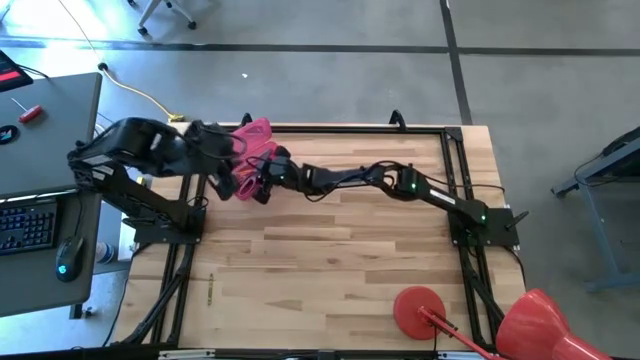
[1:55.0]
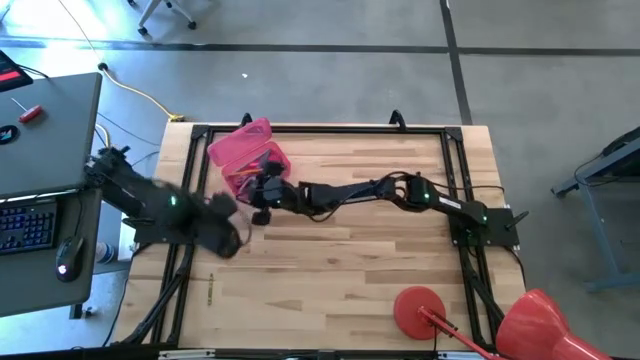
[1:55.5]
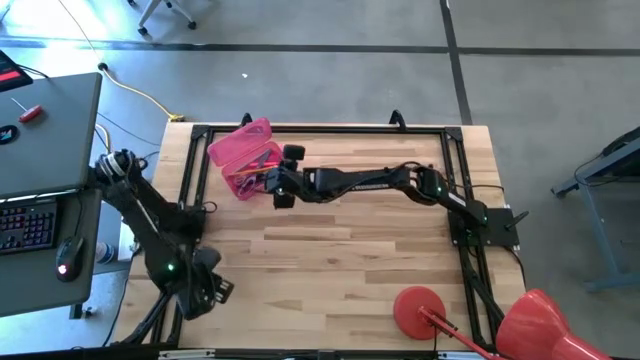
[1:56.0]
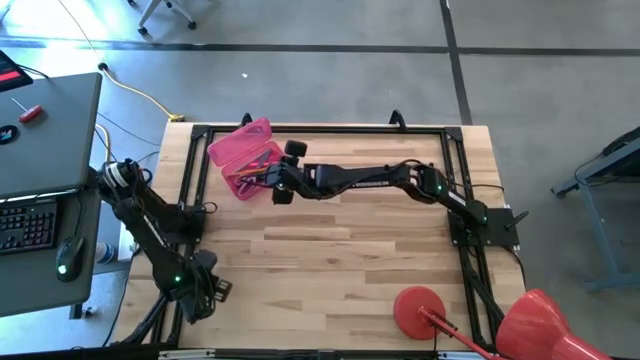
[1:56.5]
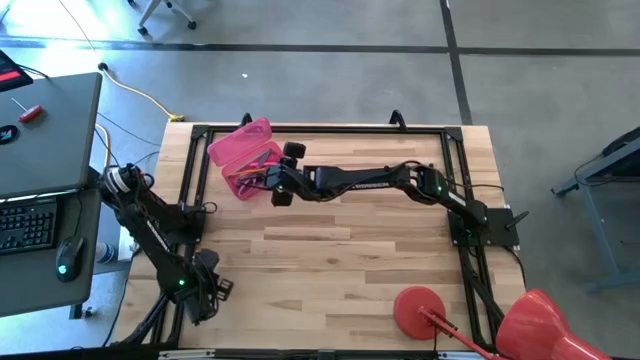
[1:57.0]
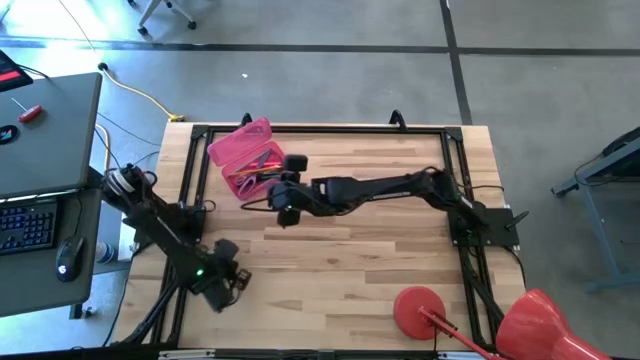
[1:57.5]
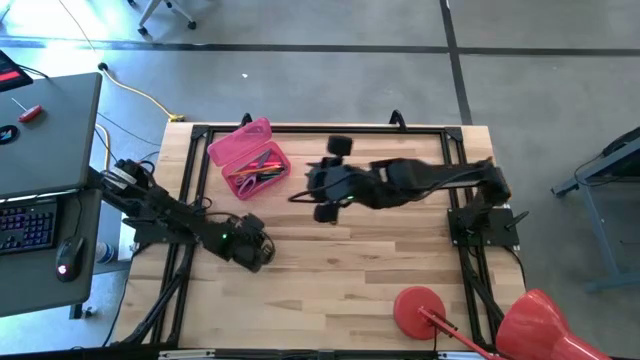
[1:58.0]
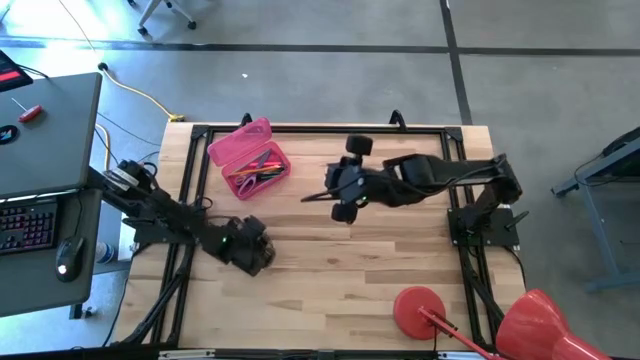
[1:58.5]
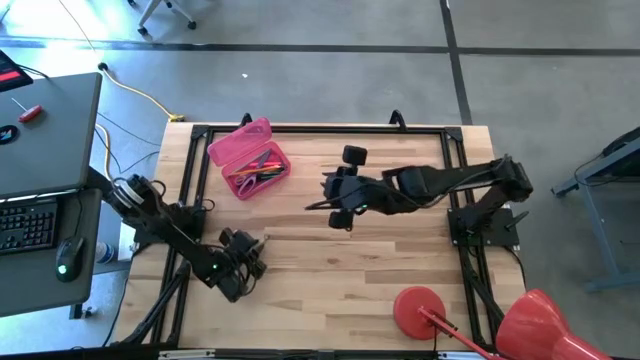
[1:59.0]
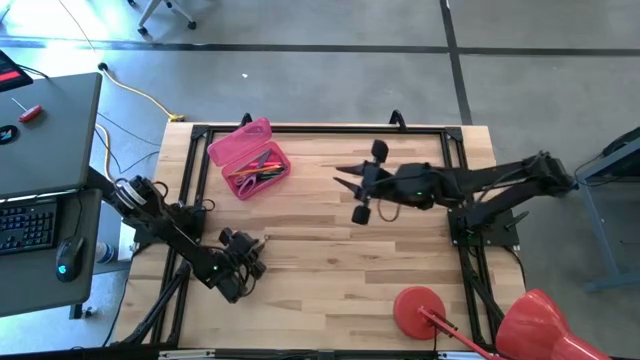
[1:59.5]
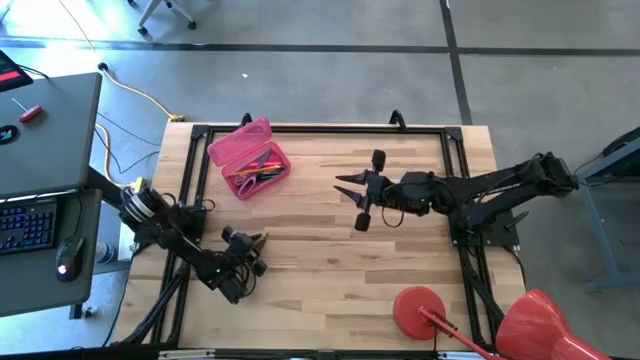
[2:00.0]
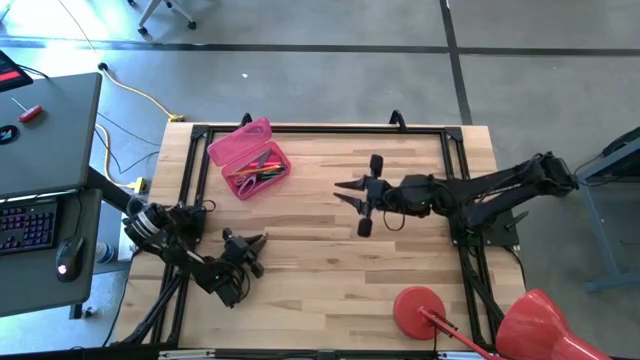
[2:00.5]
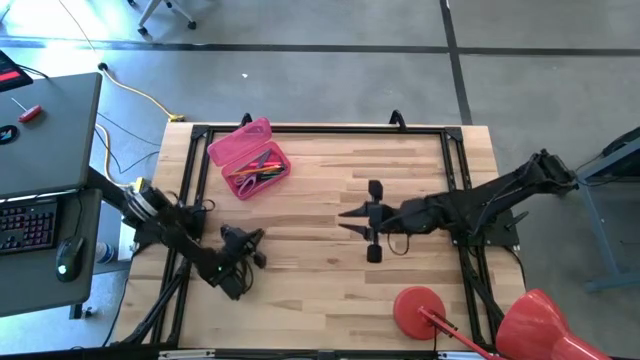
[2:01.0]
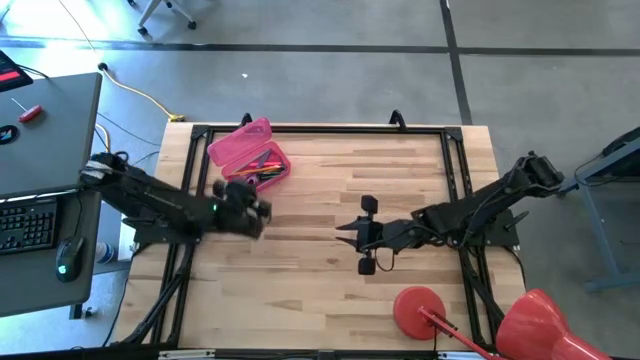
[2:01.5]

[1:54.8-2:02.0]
Task: Pick & place school supplies into a supply box
Put the light green crayon into the supply box

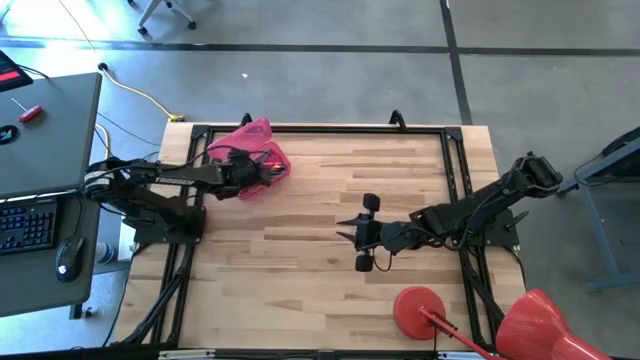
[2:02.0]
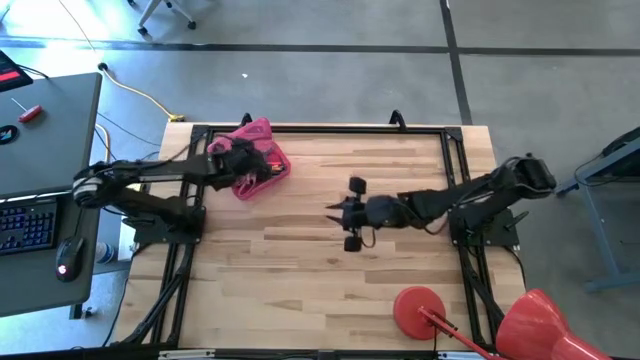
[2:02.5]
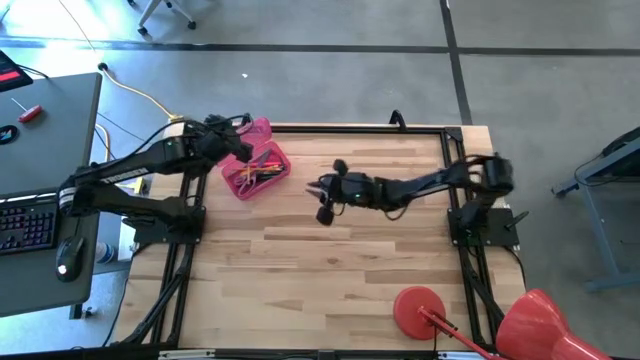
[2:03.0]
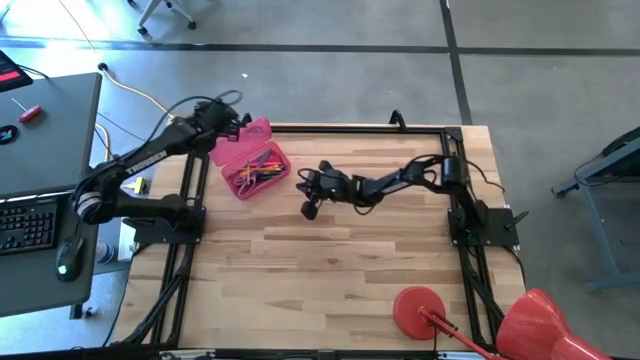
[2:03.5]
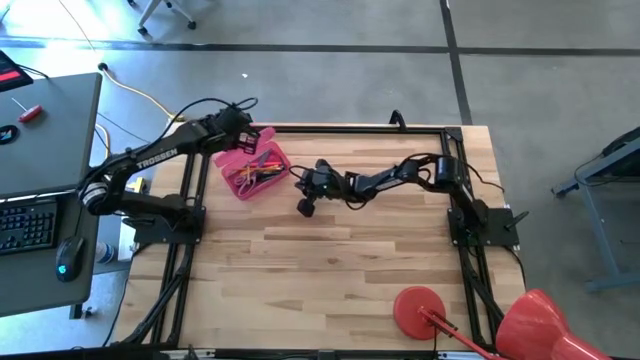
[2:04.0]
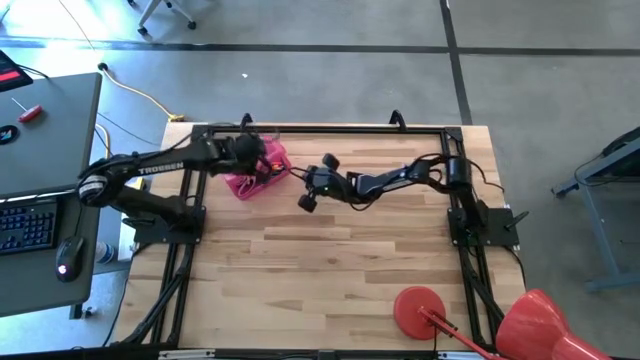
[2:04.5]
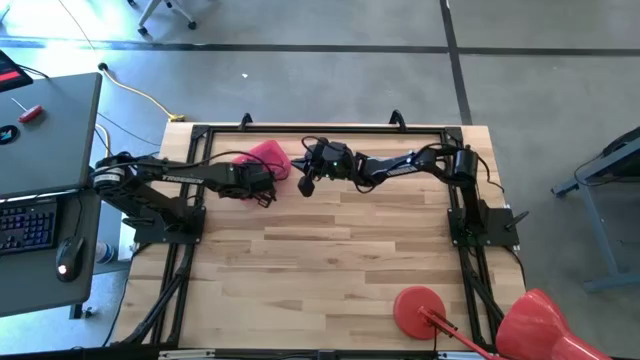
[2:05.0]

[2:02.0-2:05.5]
Close the supply box

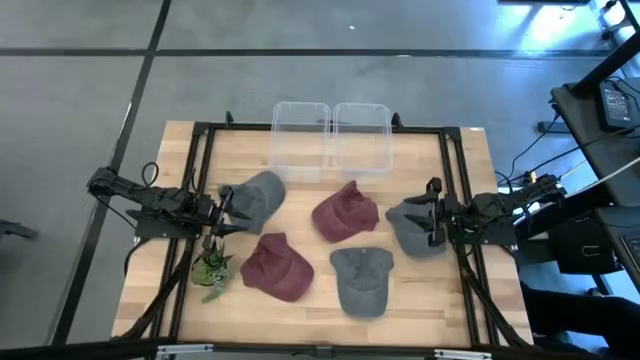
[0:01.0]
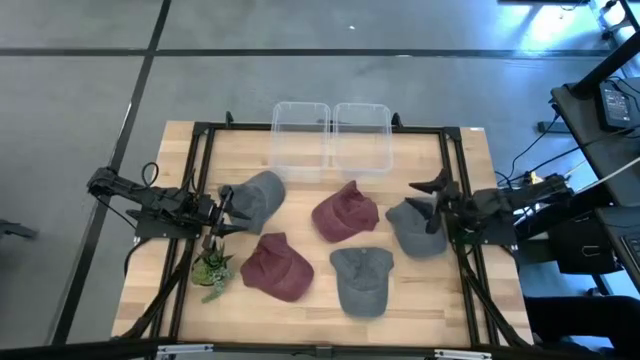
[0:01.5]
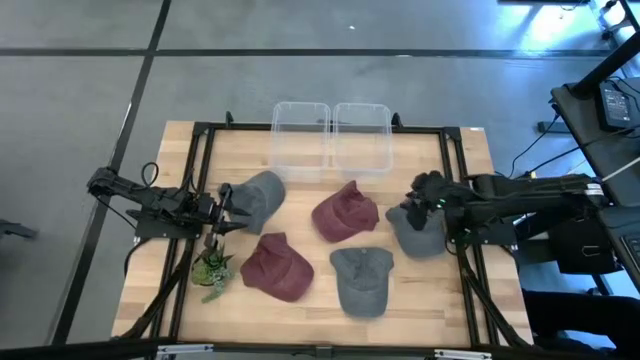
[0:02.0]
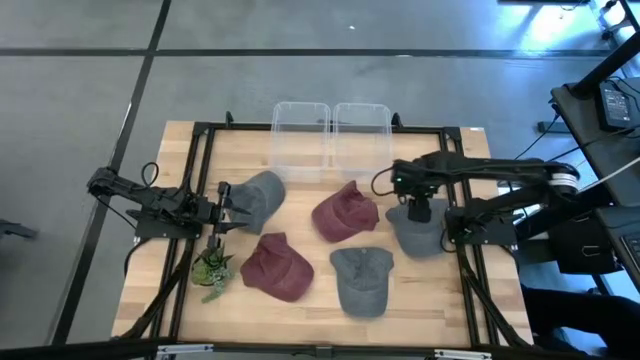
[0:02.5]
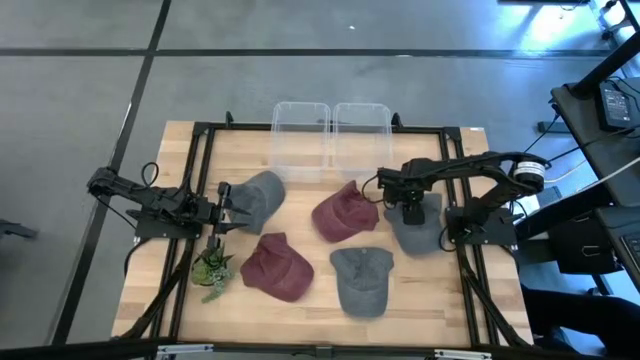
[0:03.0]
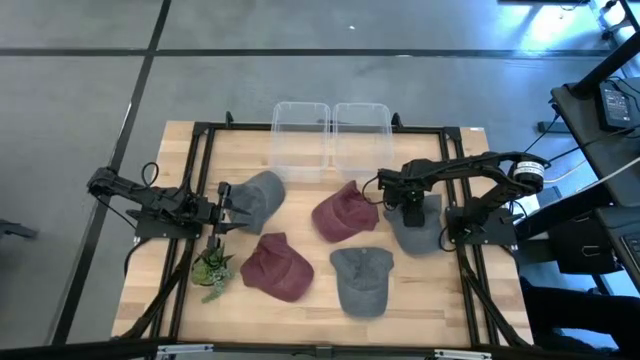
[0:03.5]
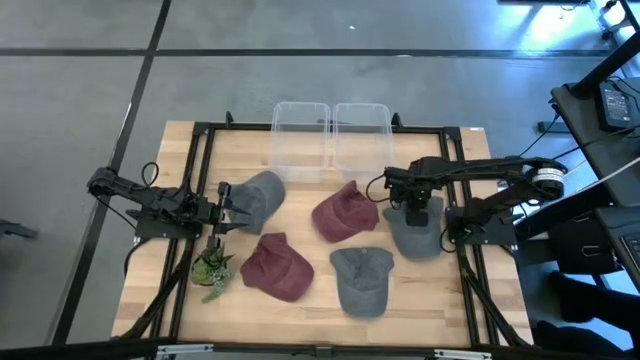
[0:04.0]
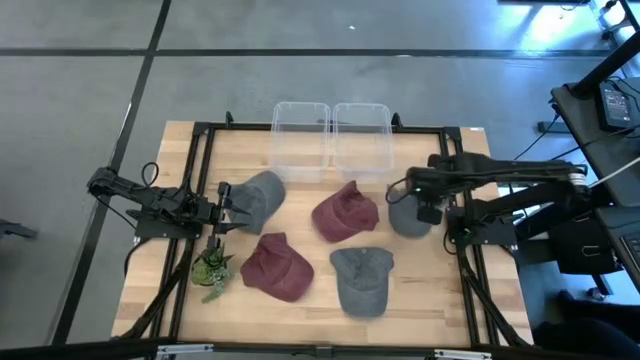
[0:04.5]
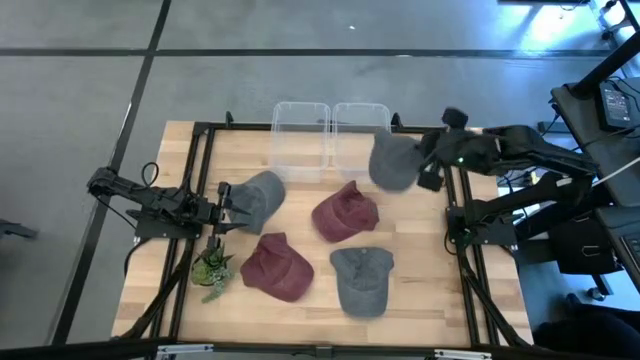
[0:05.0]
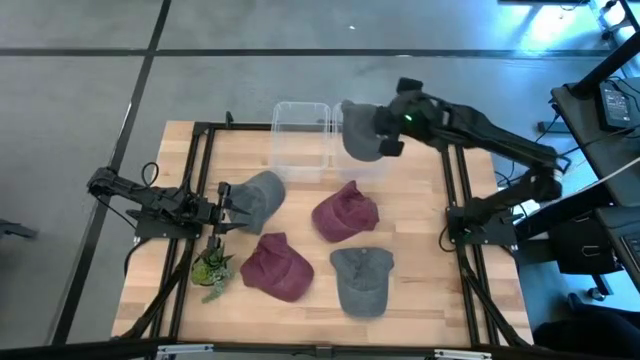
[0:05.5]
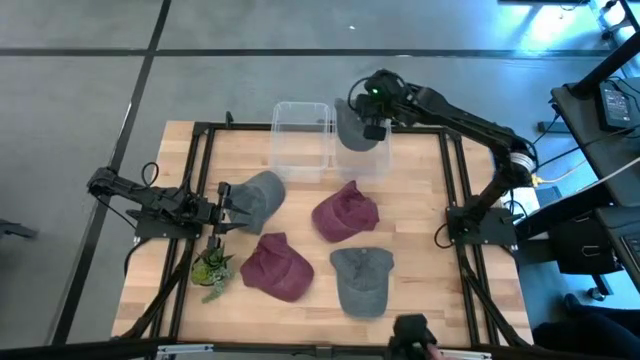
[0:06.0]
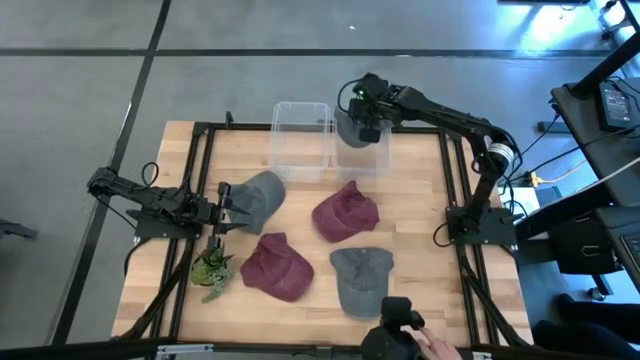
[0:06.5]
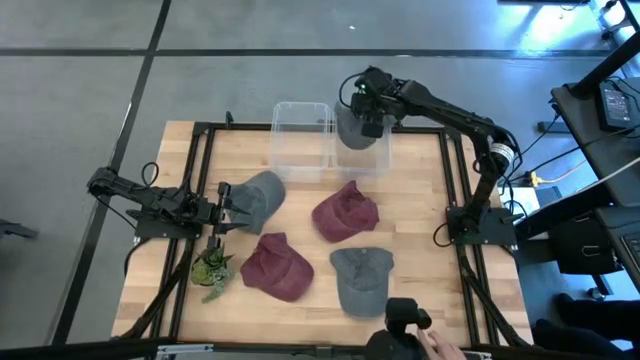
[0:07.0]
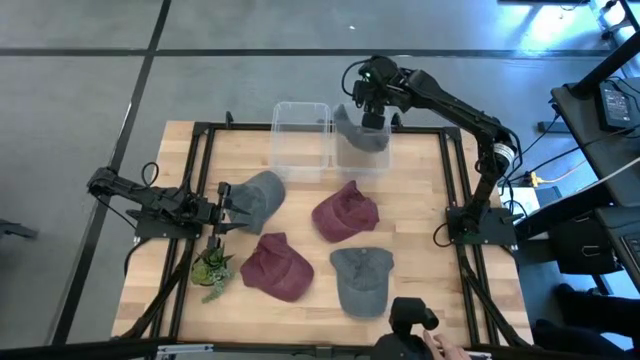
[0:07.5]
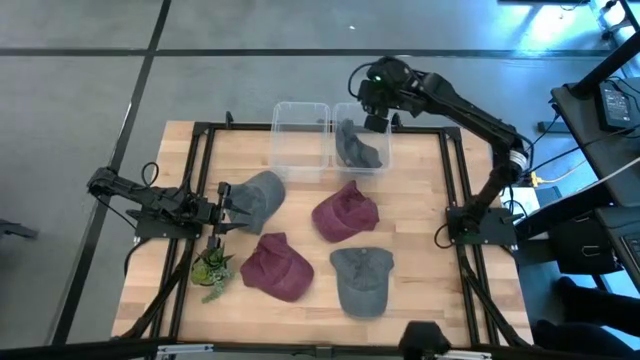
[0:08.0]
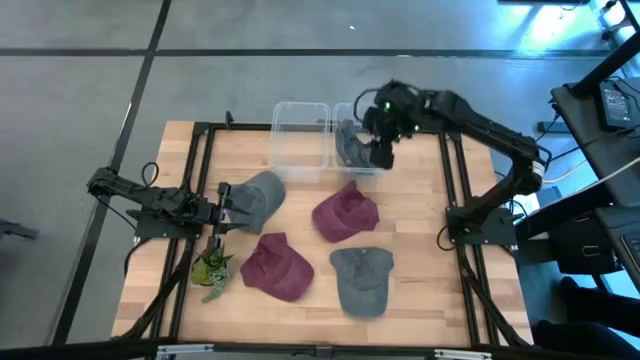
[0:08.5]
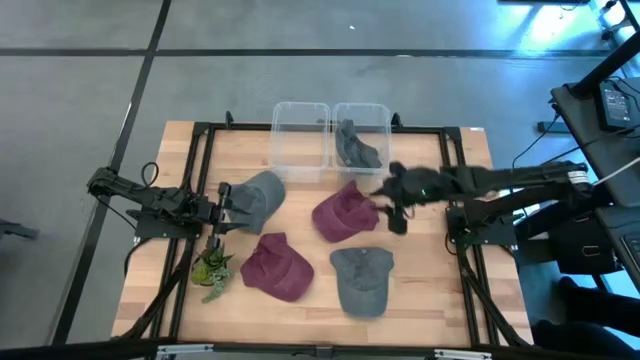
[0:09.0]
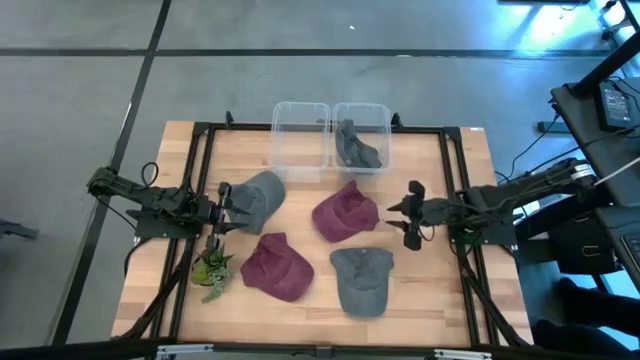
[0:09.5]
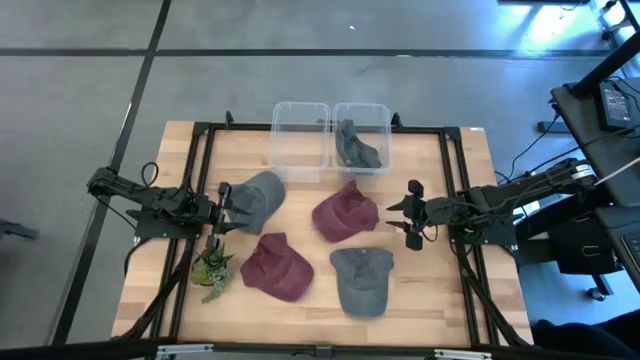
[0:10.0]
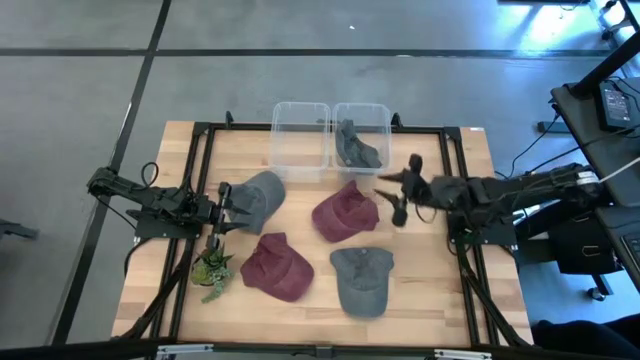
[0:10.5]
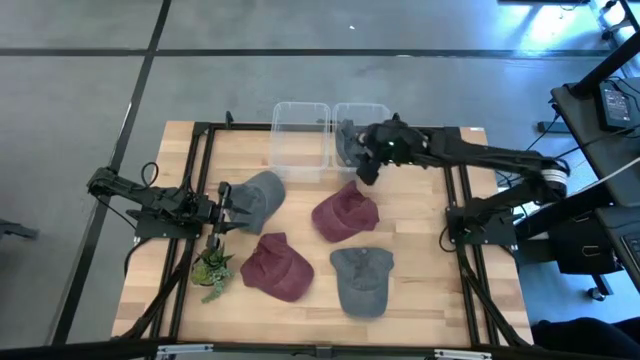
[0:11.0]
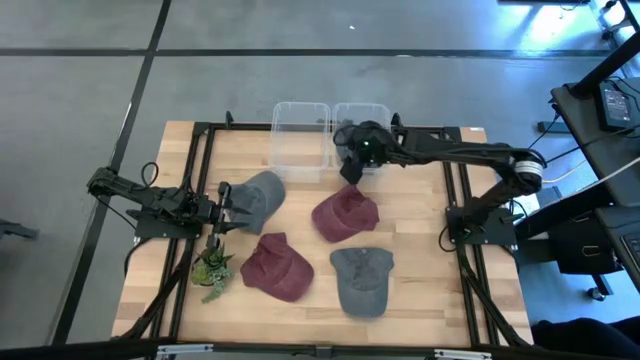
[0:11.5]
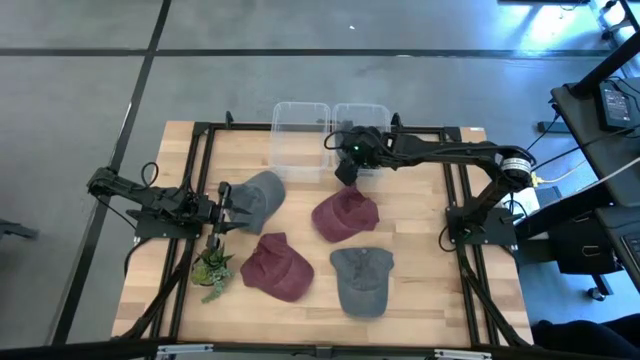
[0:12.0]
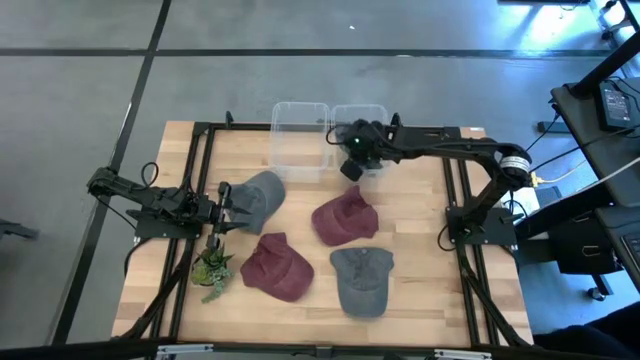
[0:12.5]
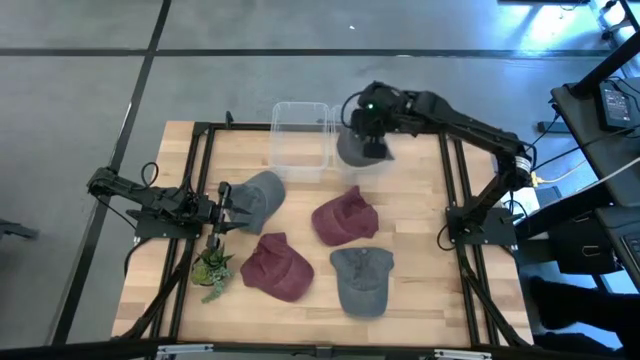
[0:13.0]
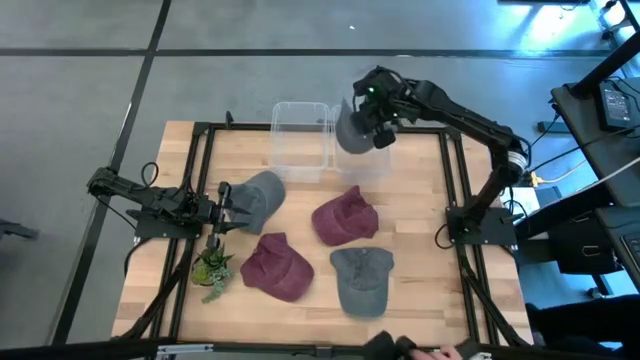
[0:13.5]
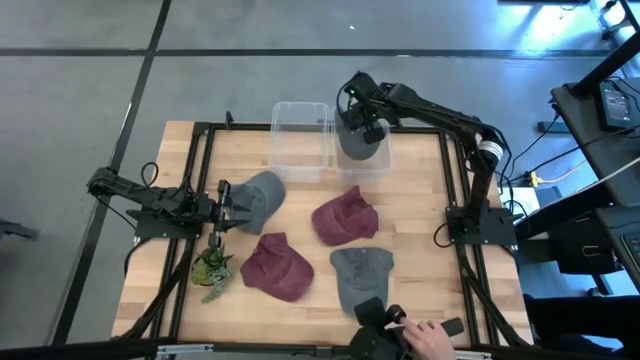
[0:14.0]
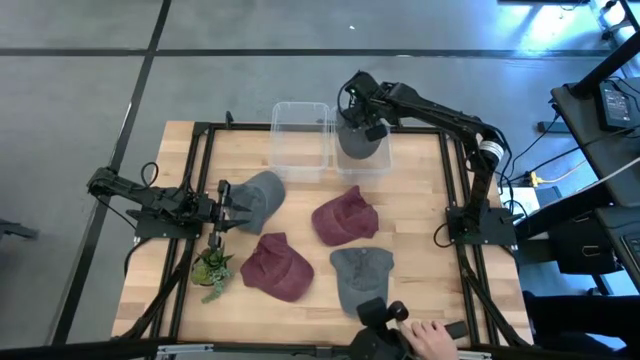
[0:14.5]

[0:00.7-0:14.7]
Task: Pick & Place hat
Put the top right black cap into the right transparent bin
